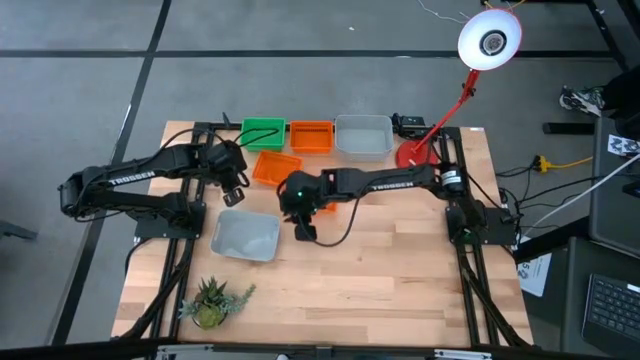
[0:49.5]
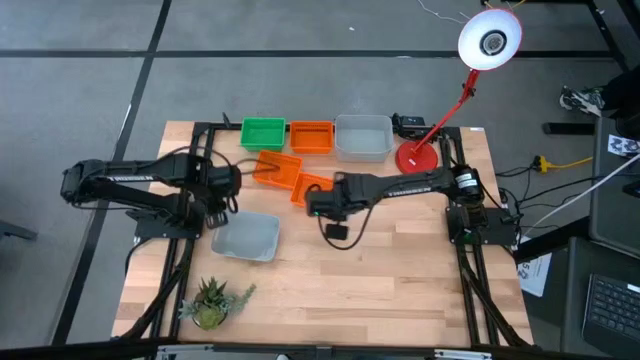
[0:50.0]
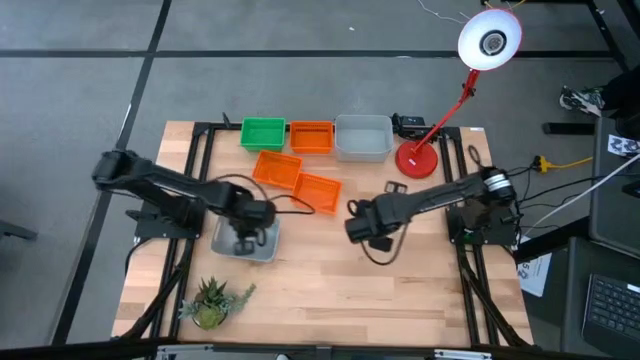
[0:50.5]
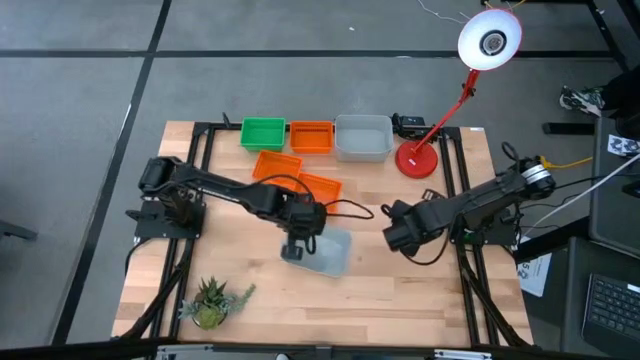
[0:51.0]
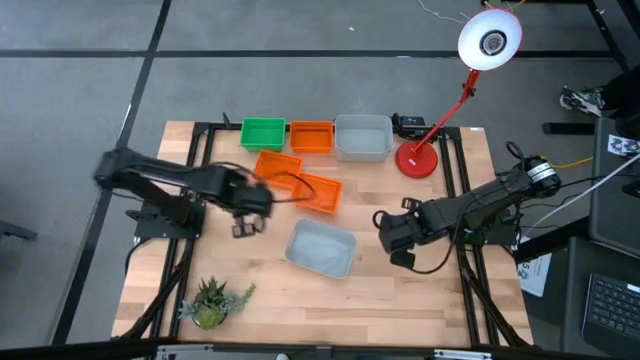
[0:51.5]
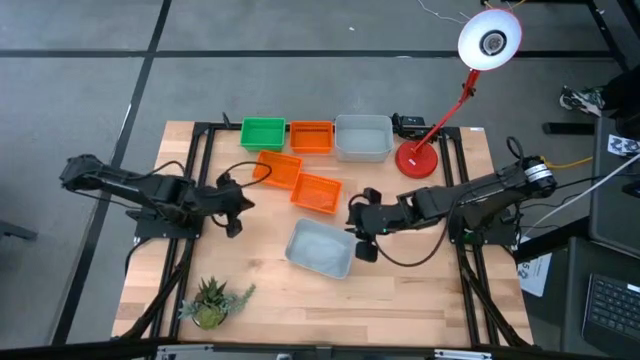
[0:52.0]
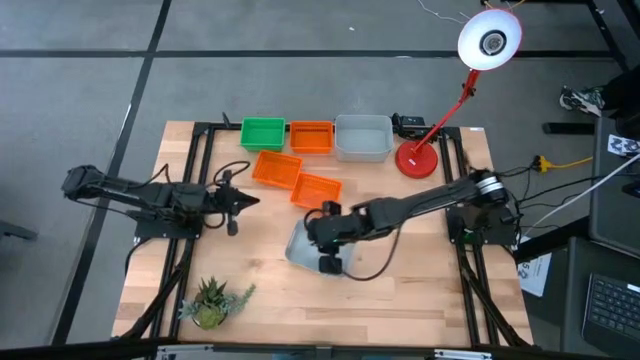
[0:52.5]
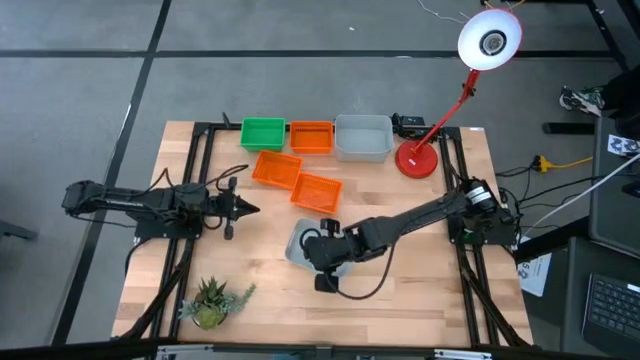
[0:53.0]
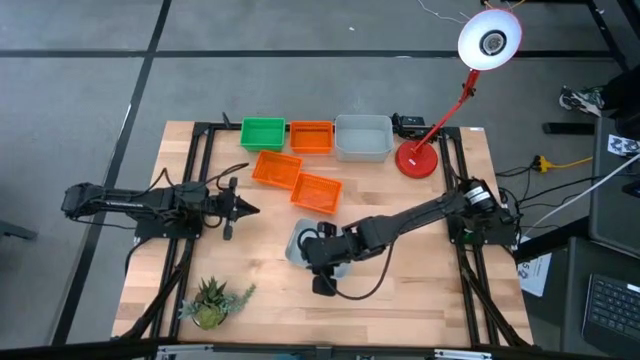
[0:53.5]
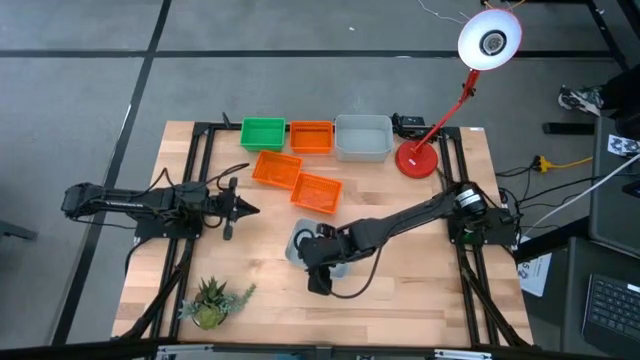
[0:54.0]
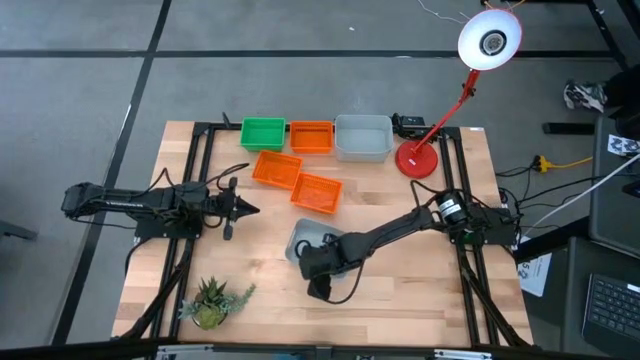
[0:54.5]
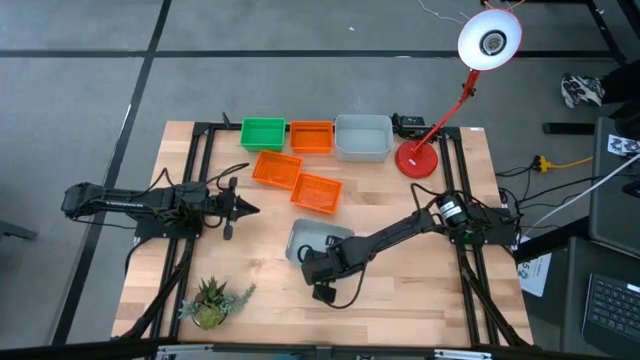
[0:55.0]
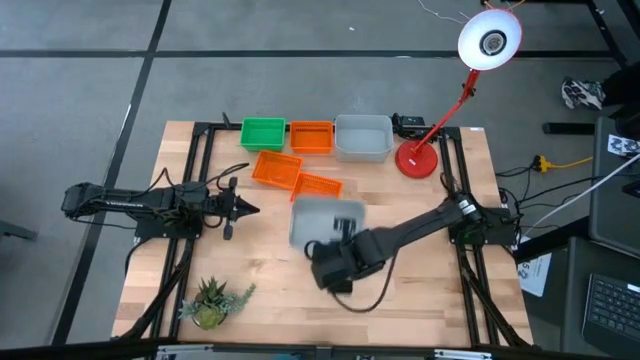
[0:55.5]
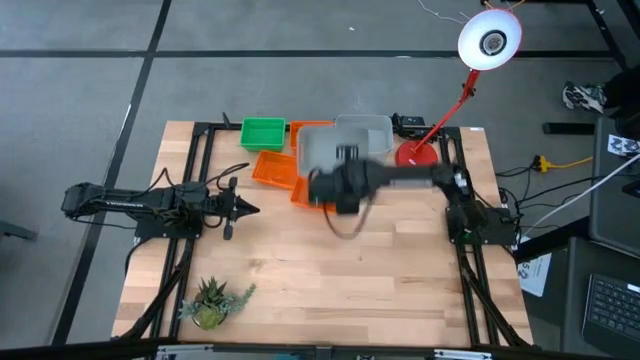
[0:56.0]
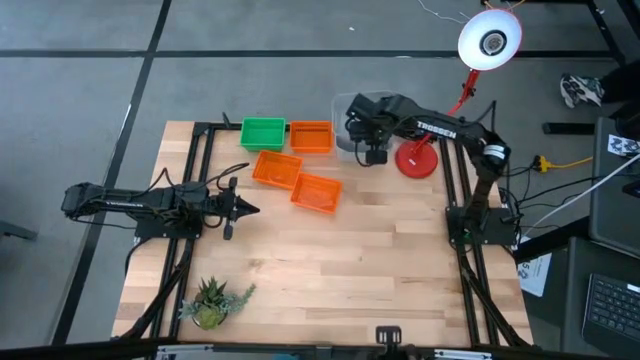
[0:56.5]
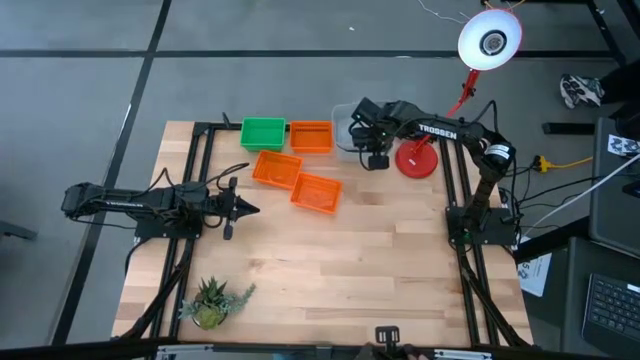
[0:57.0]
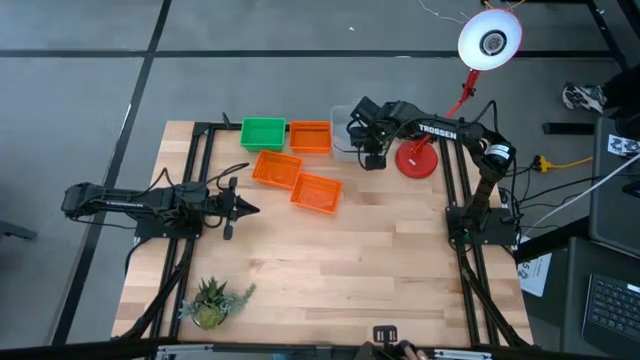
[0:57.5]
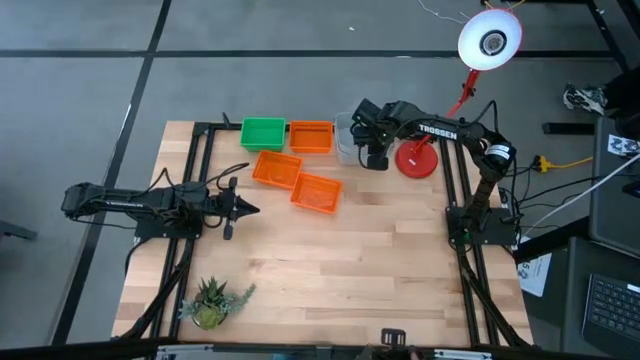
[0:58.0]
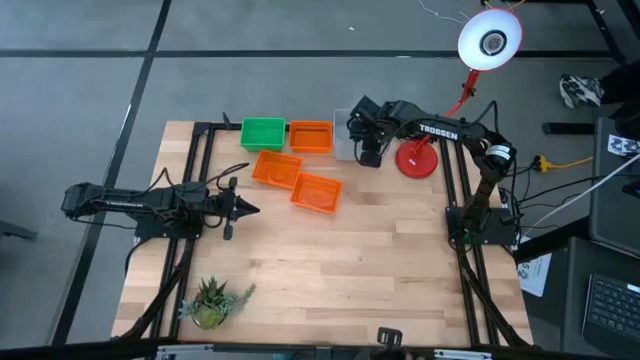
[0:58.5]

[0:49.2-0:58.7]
Stack the bottom gray bin on top of the top gray bin

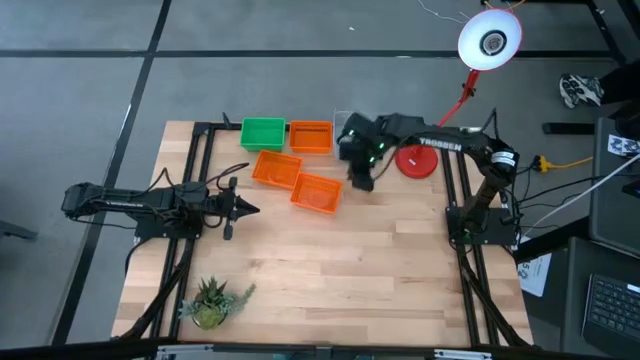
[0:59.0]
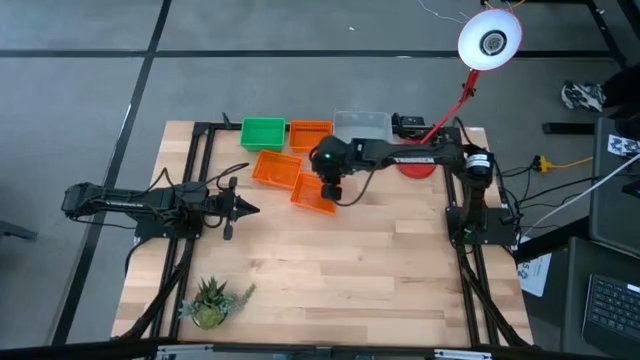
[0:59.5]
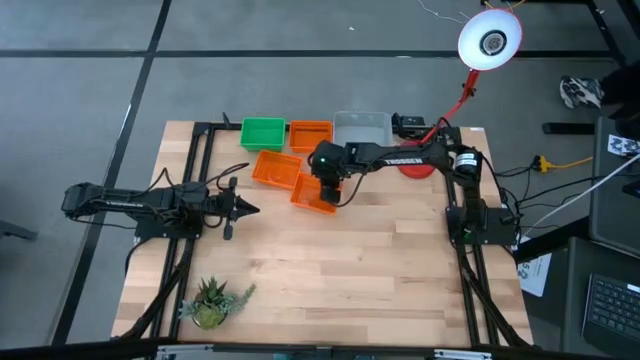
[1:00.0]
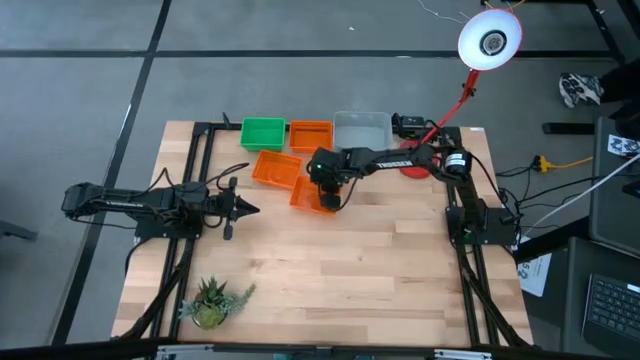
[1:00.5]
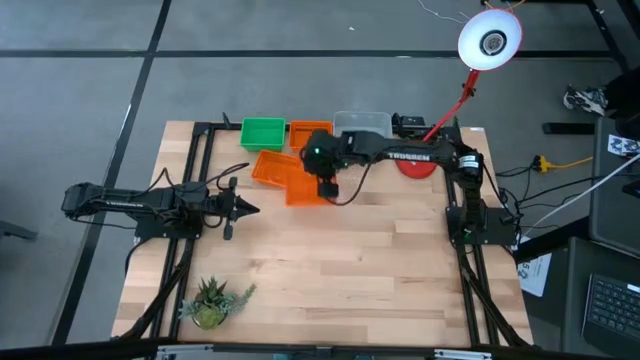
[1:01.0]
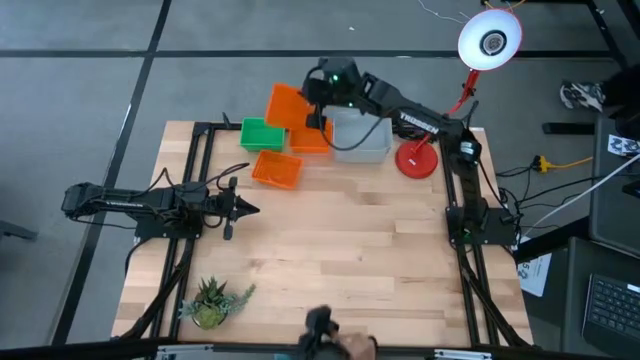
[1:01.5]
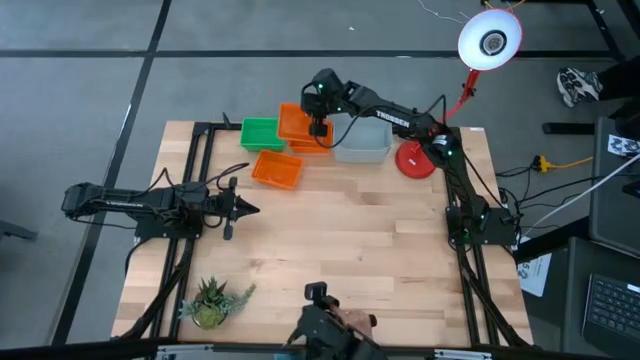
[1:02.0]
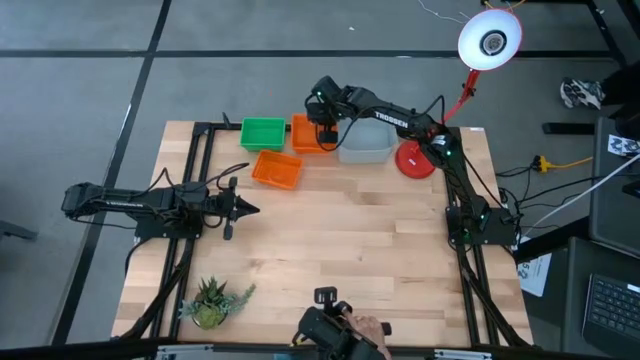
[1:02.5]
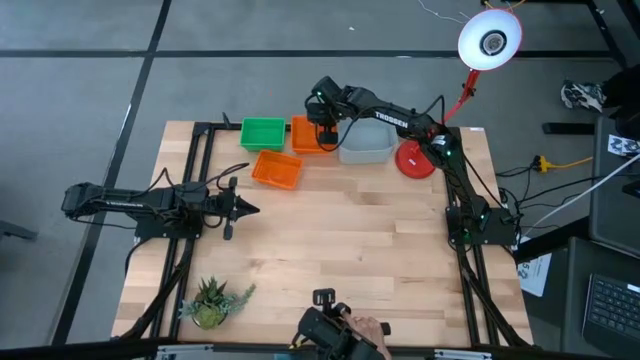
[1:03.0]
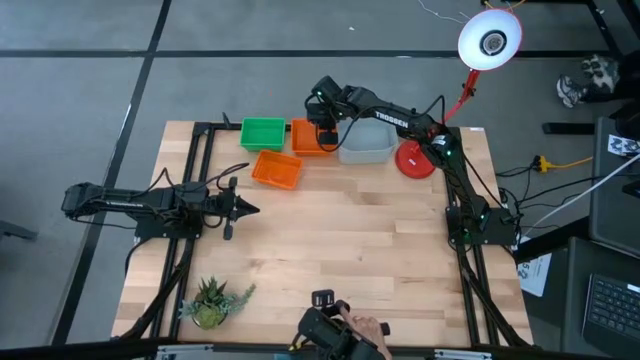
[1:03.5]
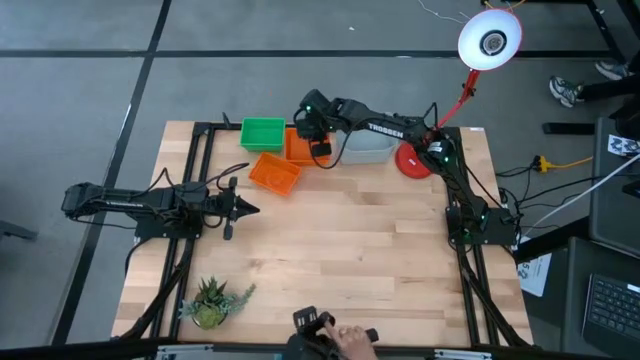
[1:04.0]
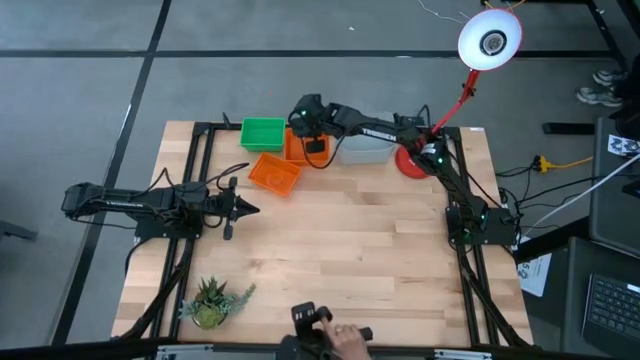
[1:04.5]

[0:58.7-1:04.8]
Stack the bottom right orange bin on top of the top orange bin

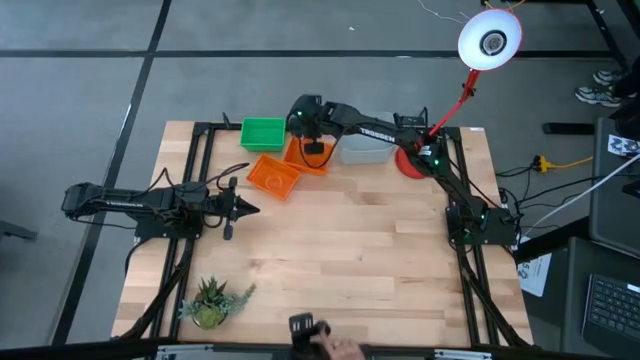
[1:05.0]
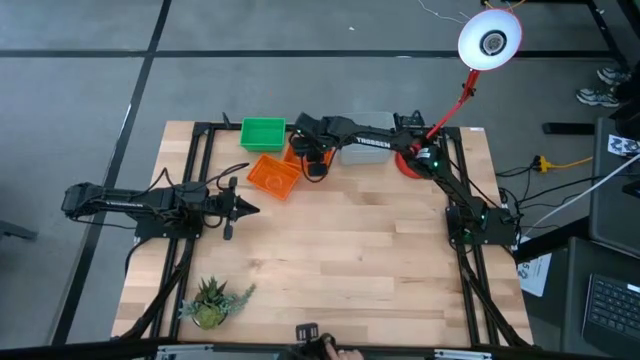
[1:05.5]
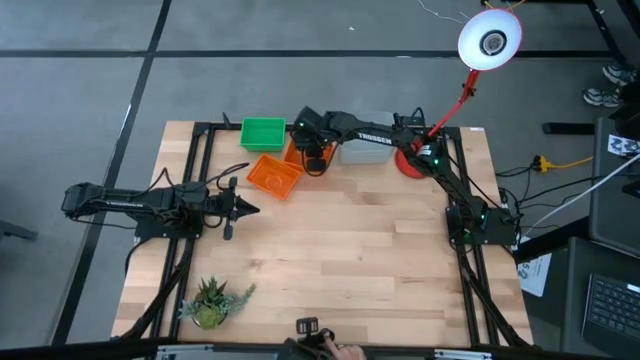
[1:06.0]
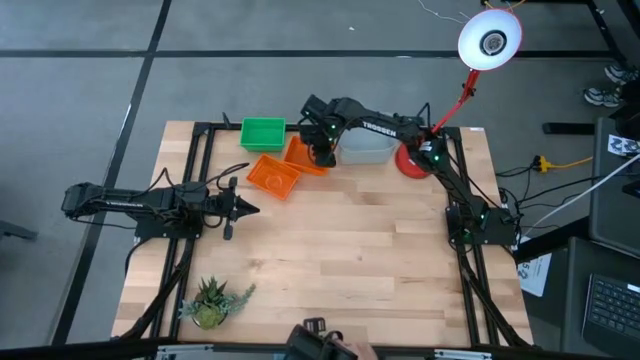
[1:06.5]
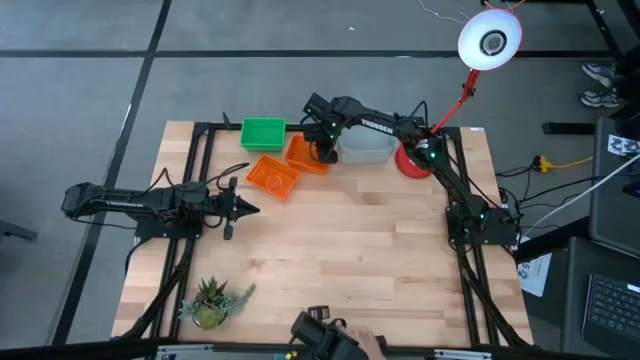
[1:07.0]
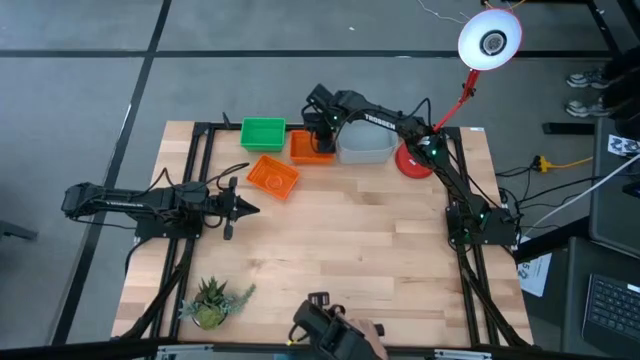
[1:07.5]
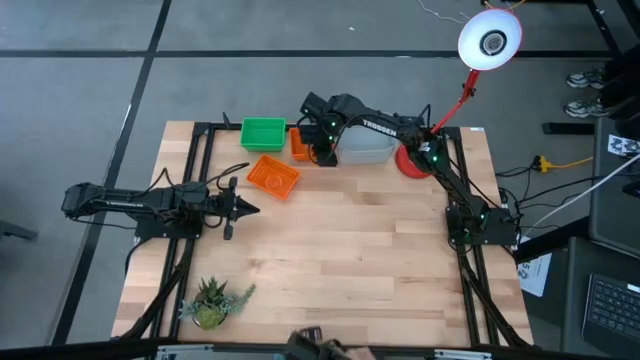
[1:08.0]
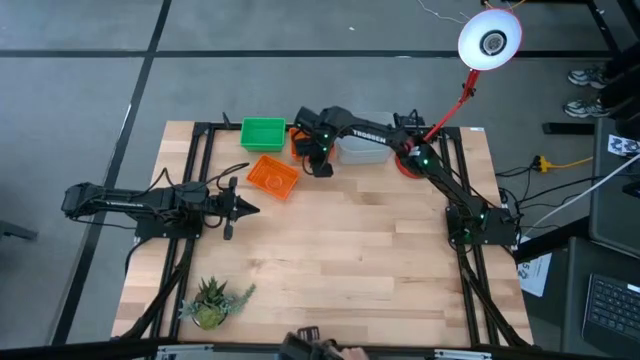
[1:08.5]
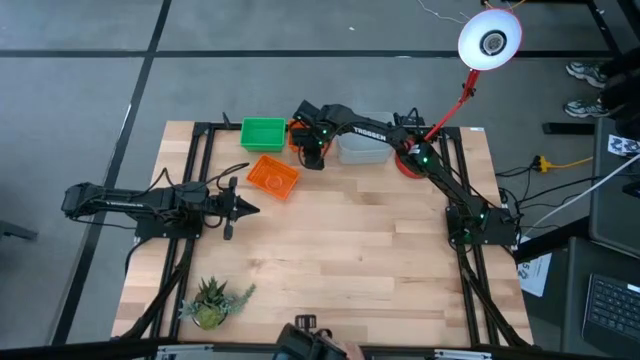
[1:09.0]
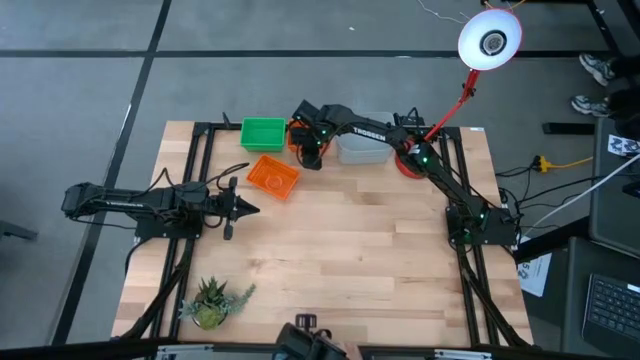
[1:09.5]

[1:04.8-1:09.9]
Adjust the top orange bin on the table
